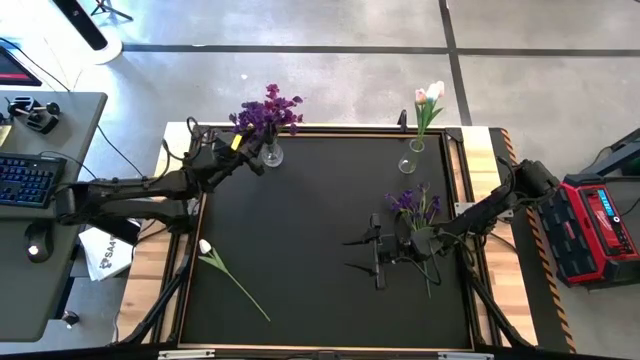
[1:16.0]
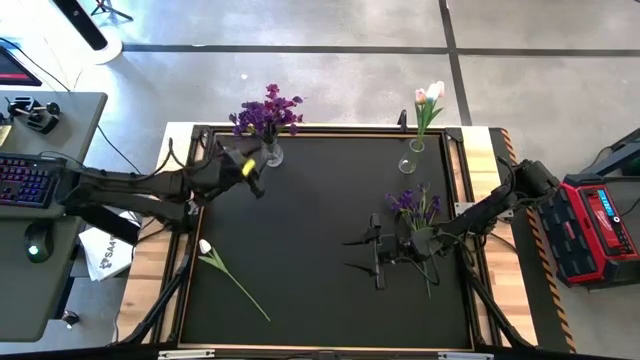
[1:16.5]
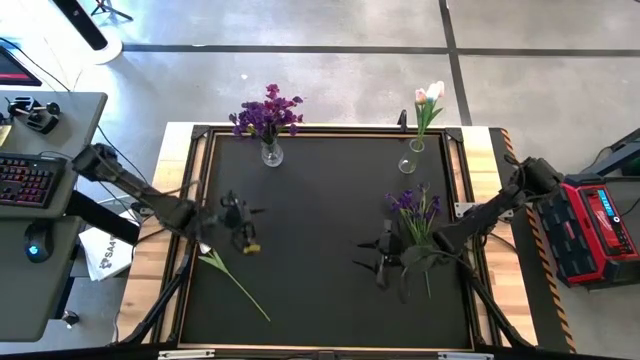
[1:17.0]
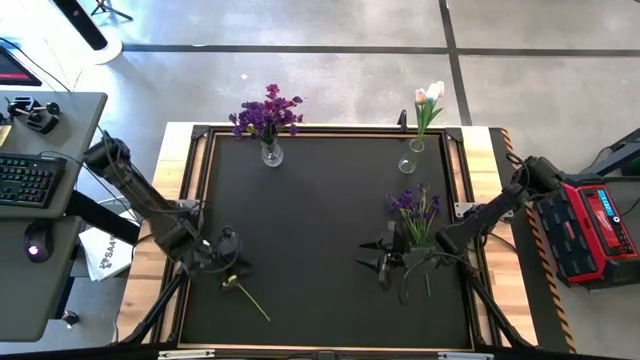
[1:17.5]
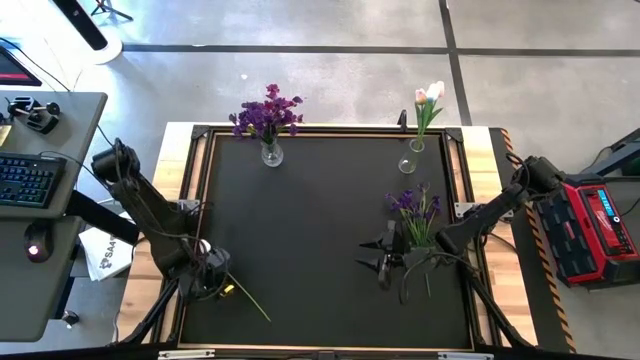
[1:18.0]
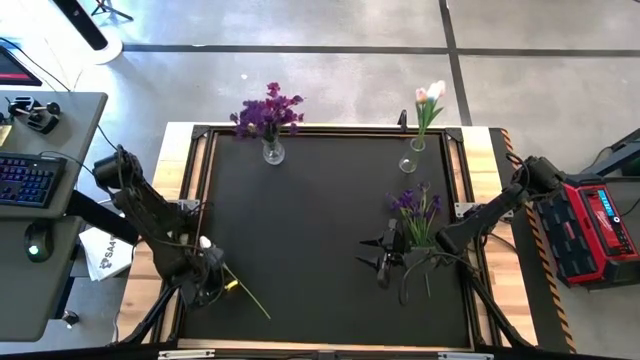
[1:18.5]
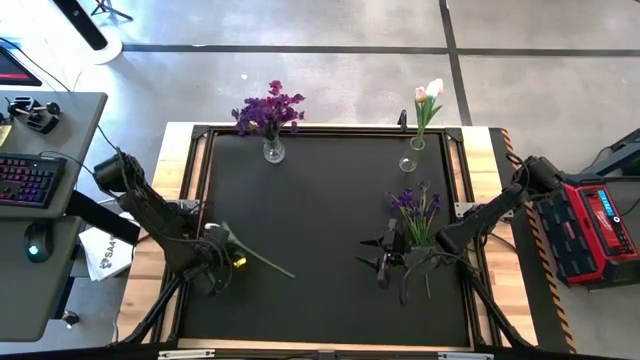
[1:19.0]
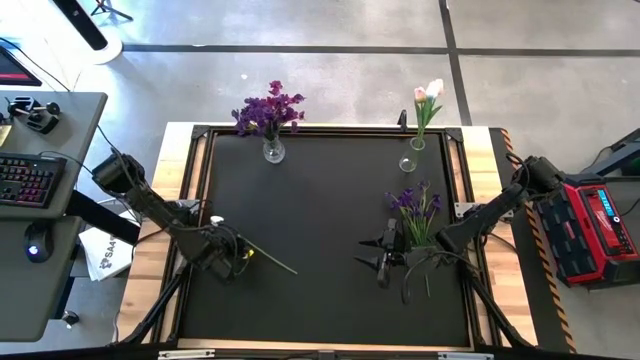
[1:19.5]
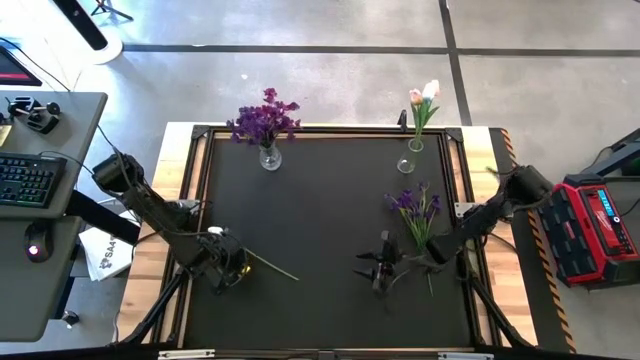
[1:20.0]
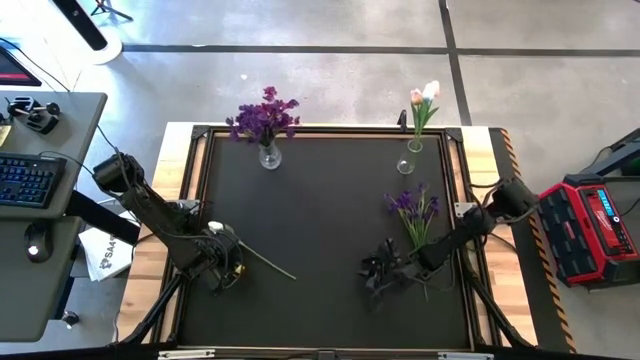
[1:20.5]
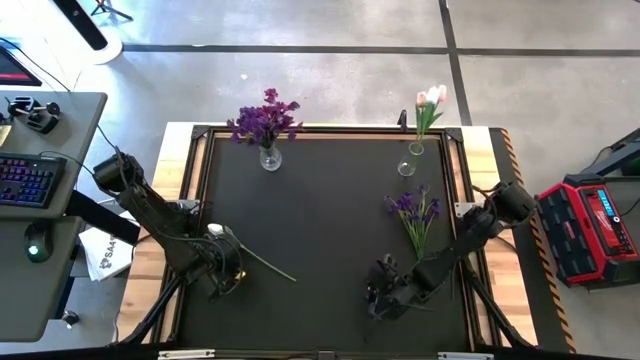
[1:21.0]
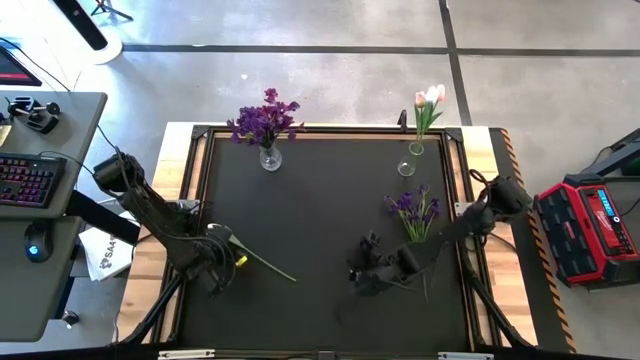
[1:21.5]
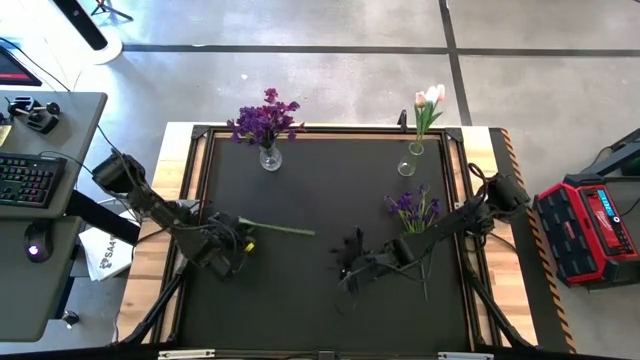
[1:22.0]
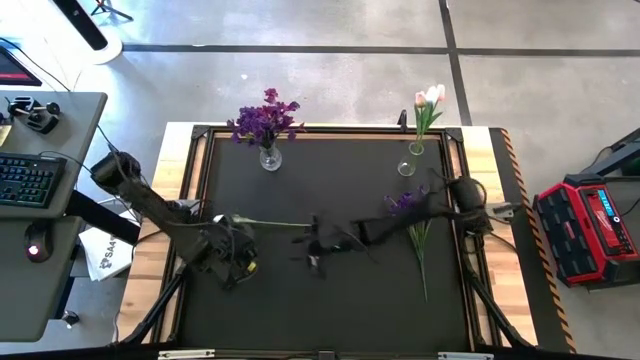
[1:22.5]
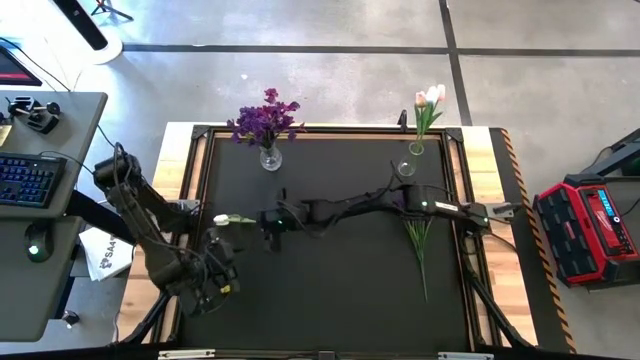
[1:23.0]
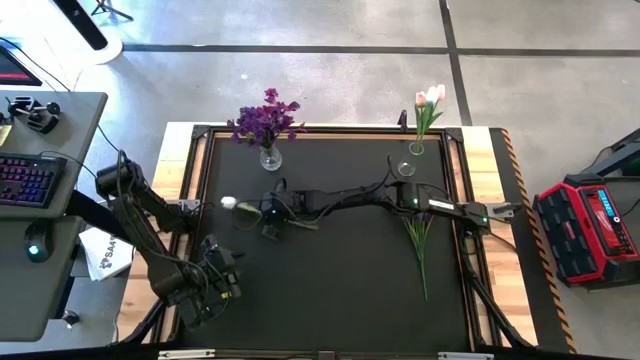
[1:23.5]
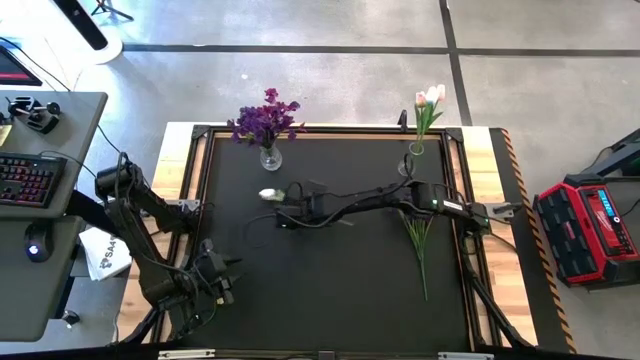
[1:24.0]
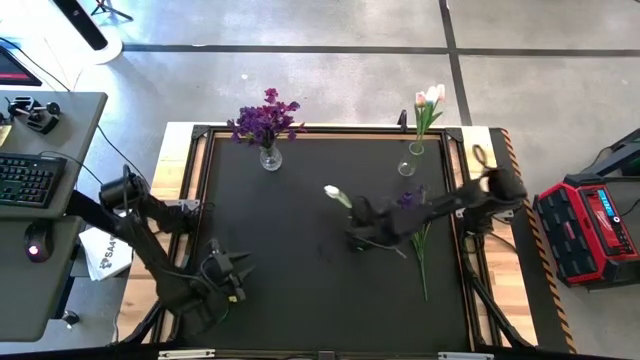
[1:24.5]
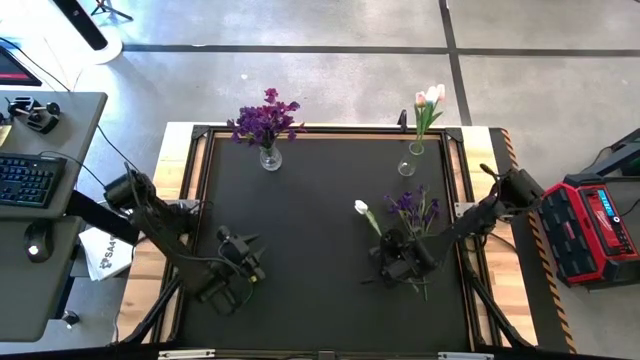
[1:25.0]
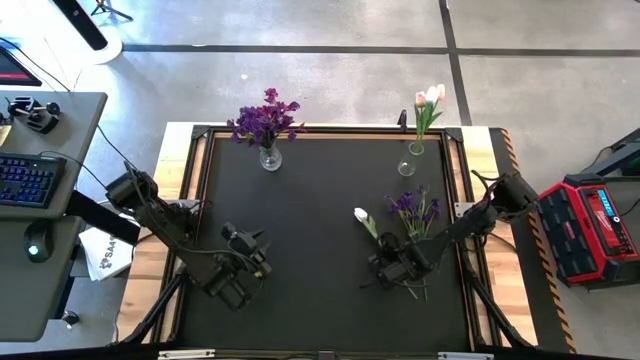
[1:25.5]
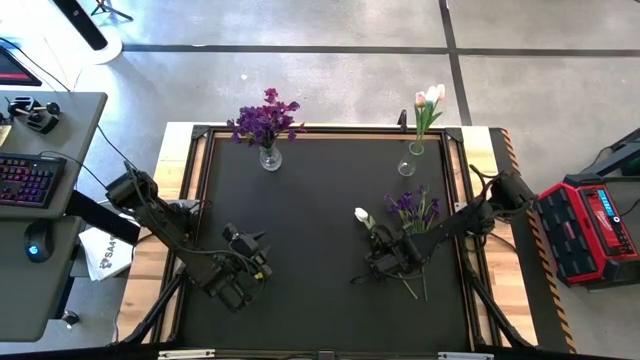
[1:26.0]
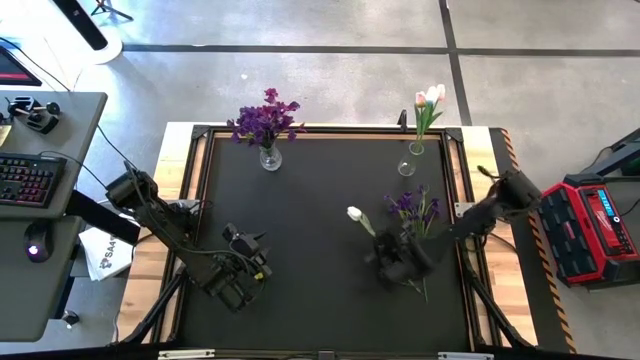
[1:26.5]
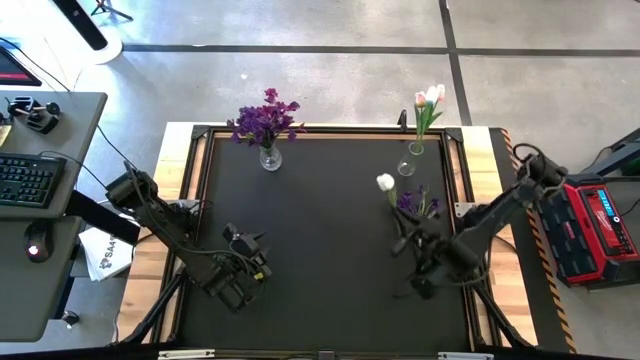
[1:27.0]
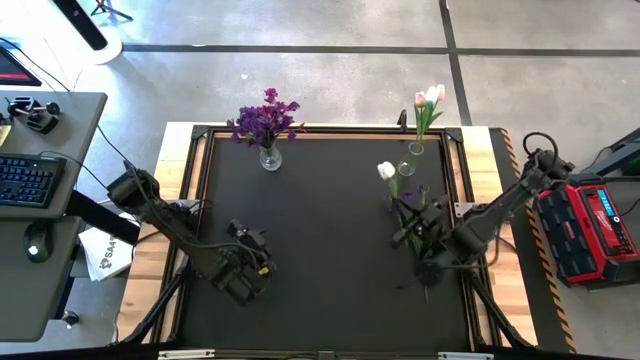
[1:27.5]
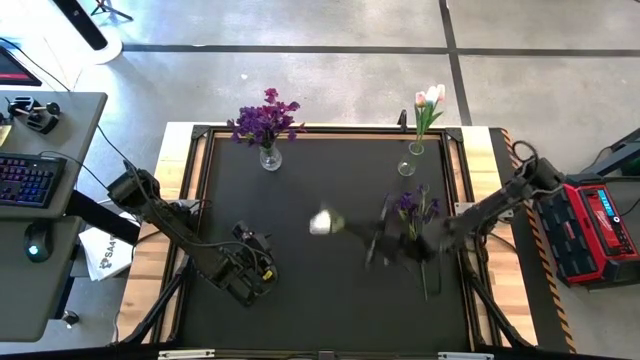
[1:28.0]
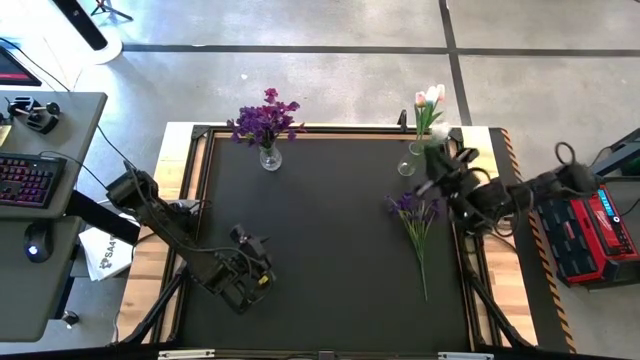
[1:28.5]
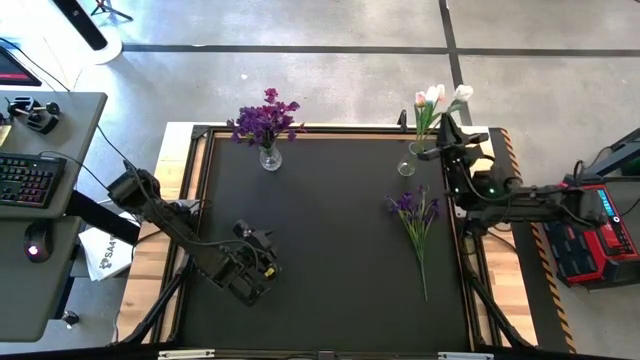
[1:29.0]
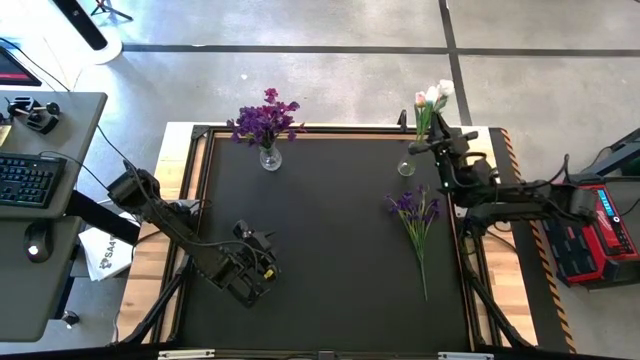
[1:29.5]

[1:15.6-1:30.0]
Task: Sort flowers into vase by color
Put the white flowers into the right transparent vase

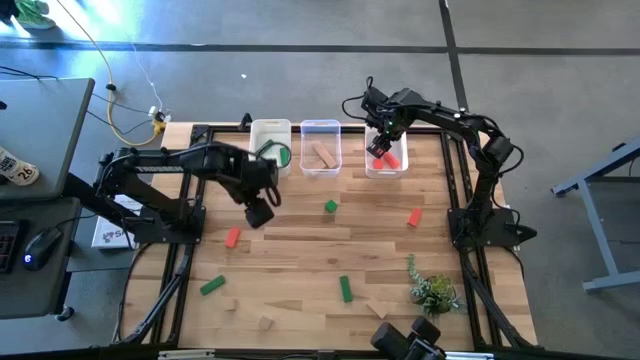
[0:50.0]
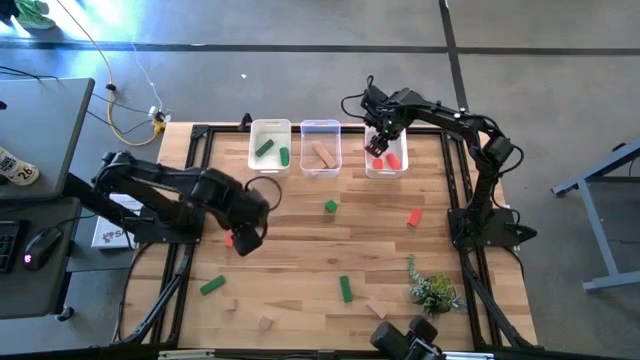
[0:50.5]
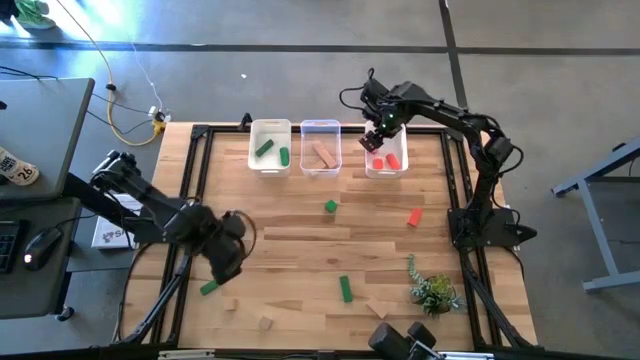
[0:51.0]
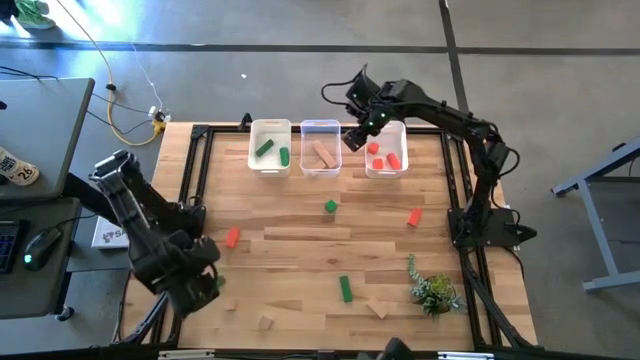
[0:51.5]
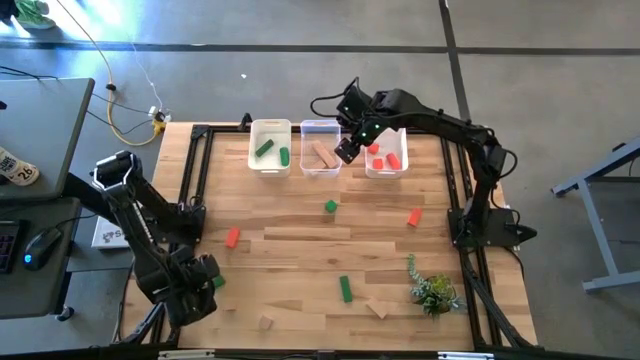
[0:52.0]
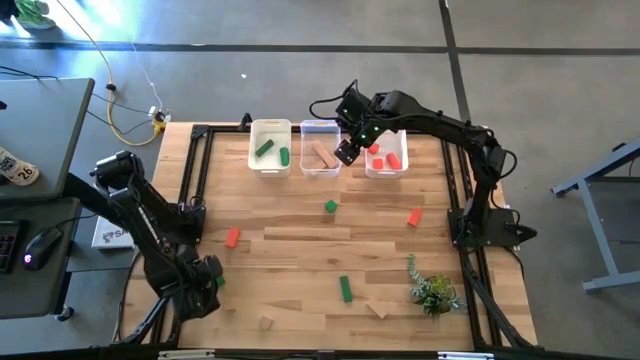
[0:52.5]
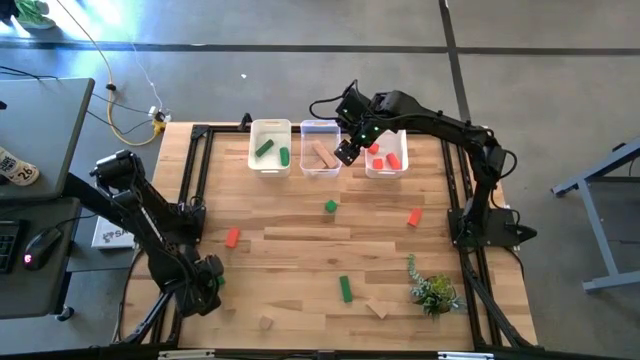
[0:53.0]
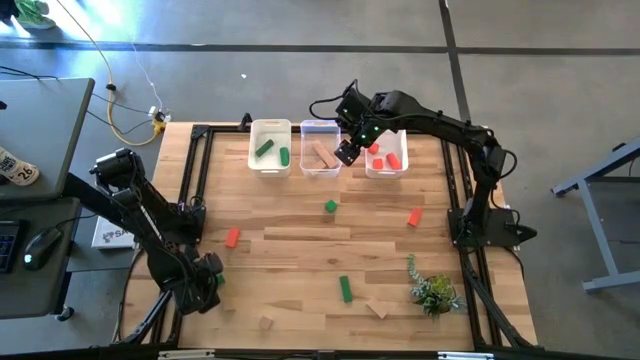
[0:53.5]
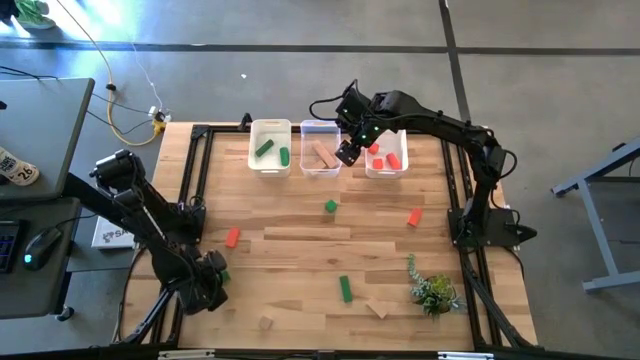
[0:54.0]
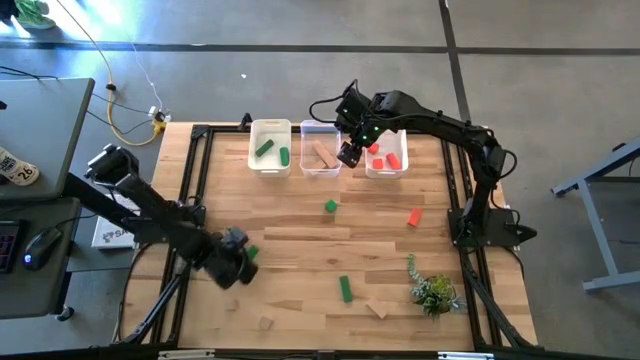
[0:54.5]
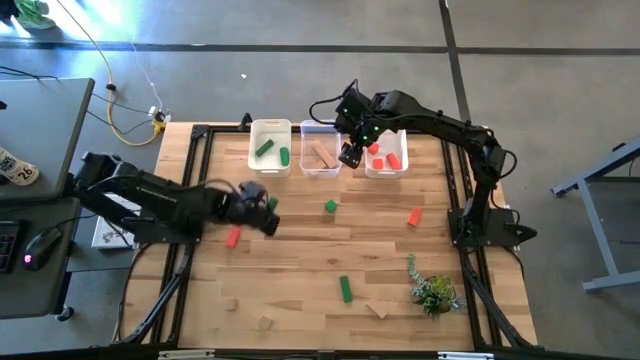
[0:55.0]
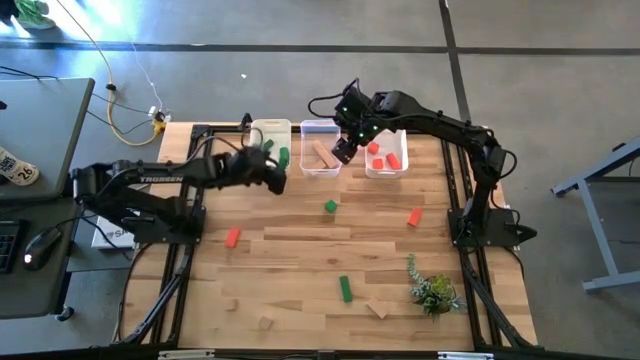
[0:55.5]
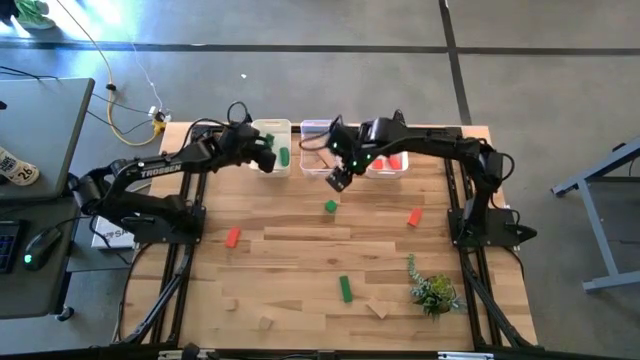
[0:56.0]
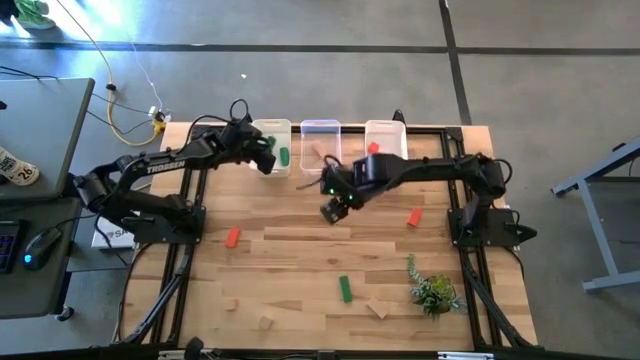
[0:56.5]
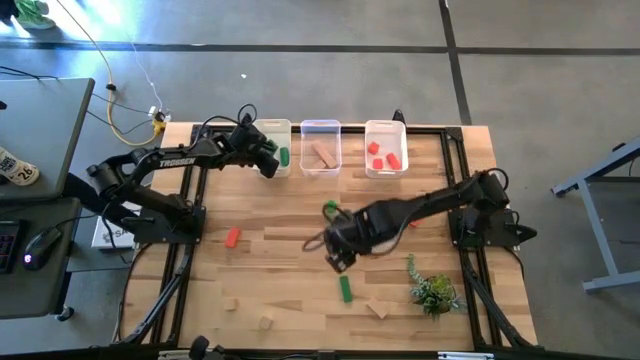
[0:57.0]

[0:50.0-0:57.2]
Task: Sort & place blocks by color
Put the green block into the left white bin
